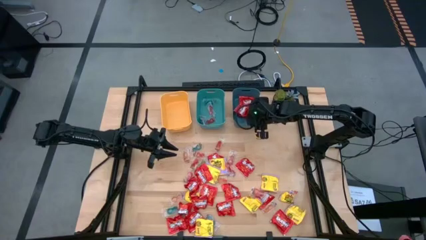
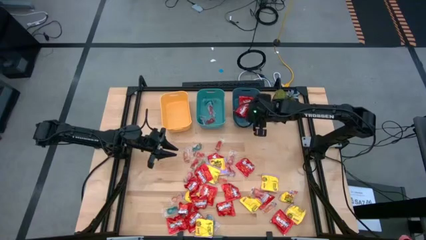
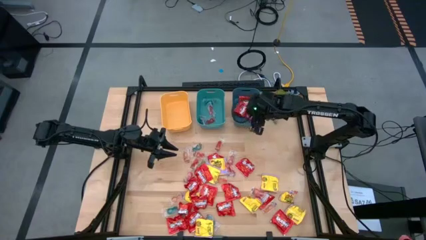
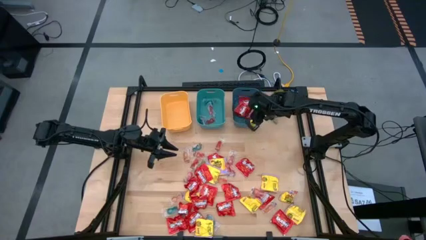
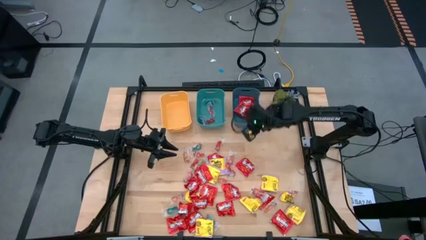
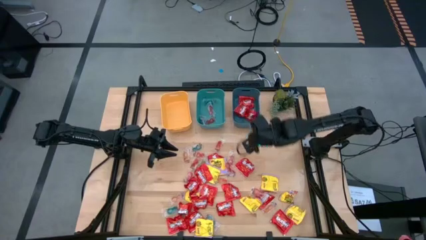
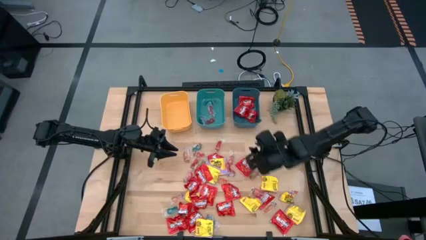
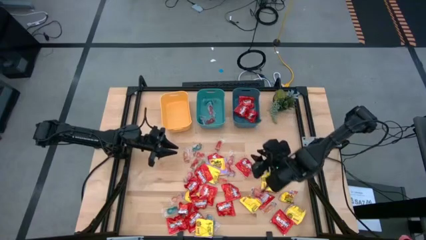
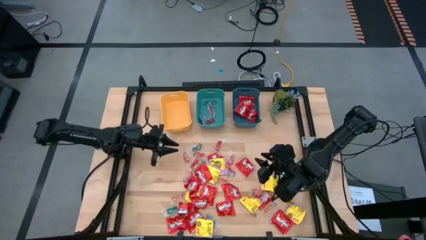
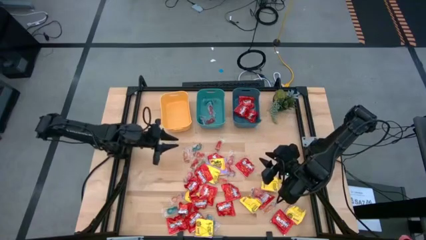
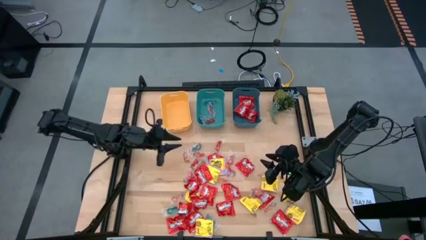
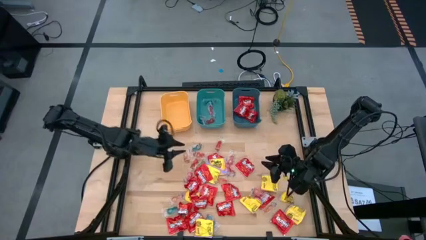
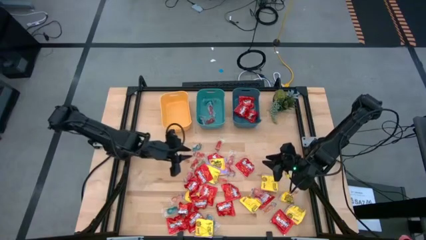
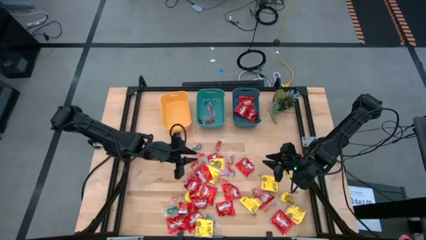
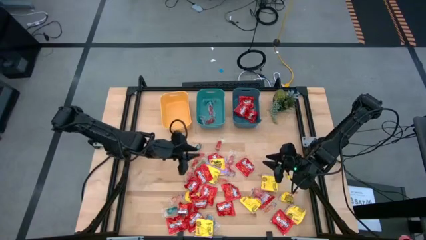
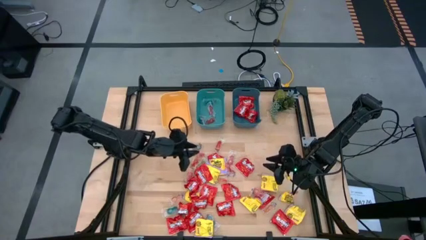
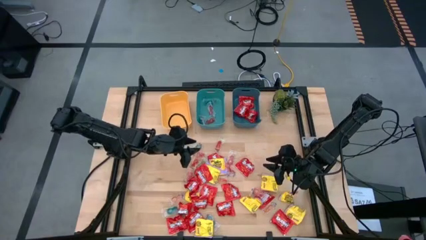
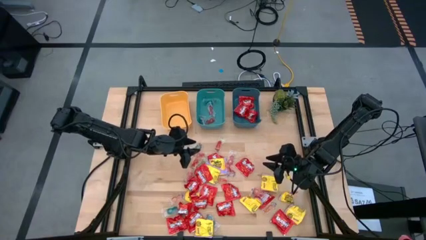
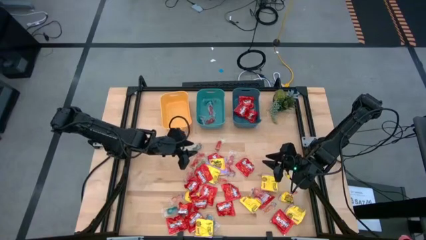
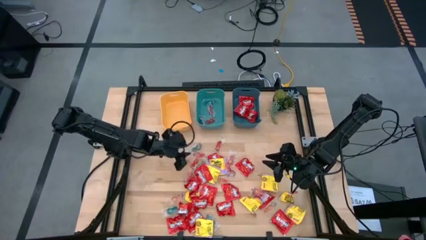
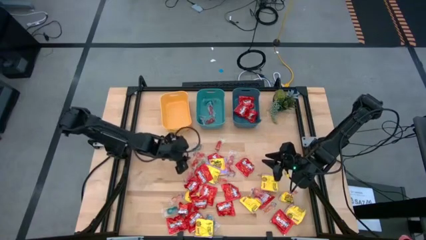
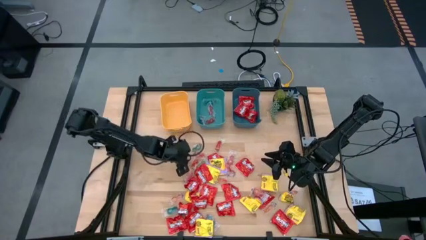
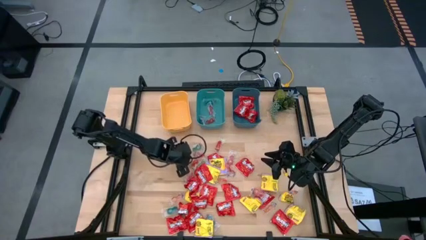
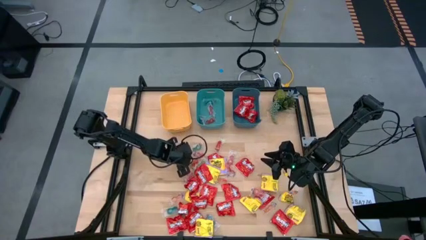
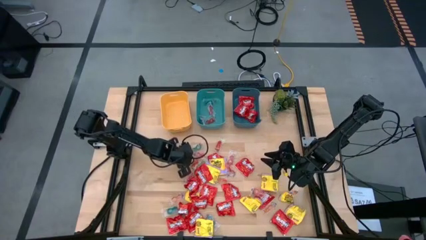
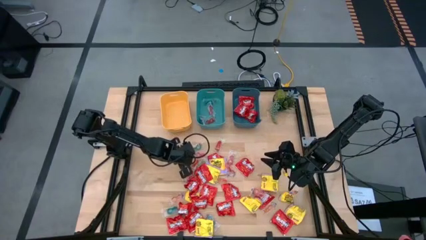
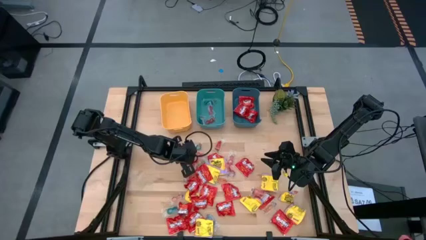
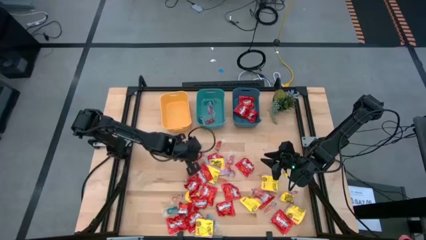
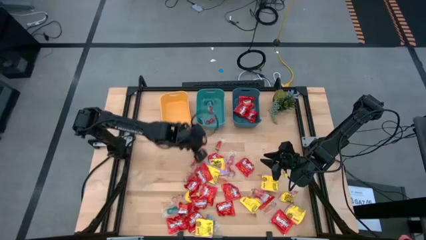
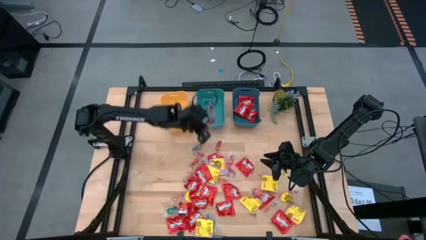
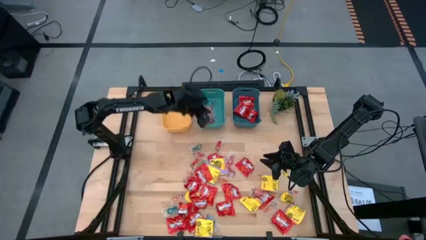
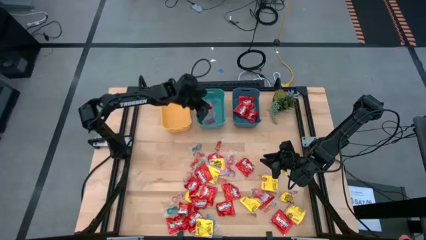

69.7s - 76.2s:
Task: Sort candy
Put the light orange gummy candy into the blue bin

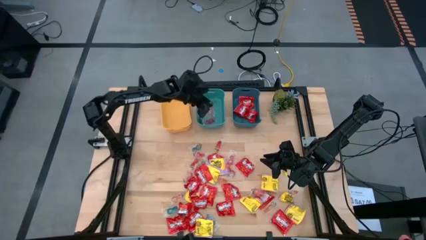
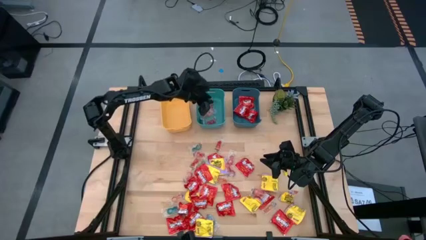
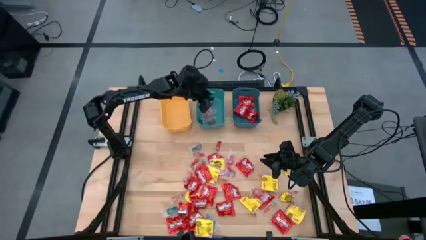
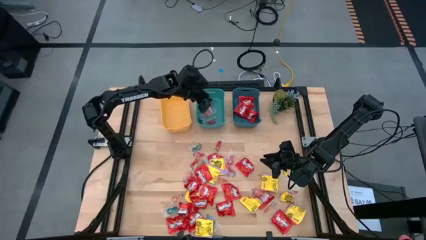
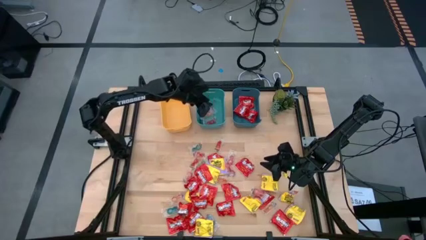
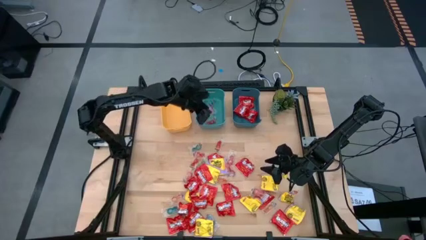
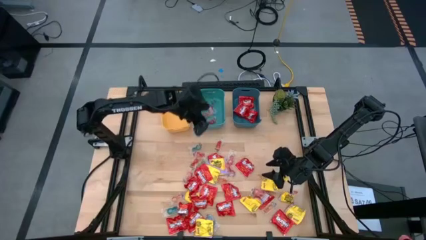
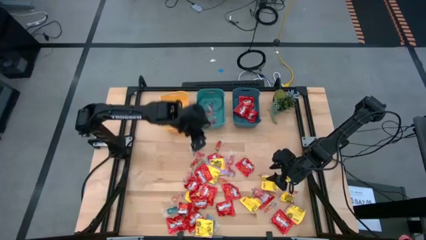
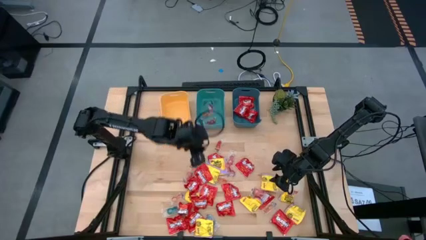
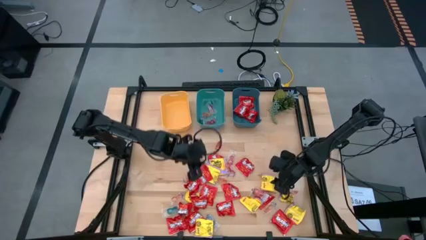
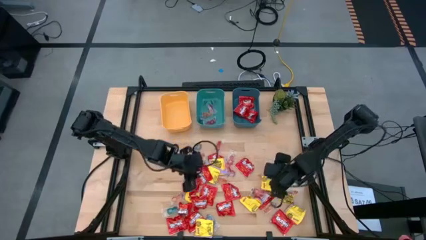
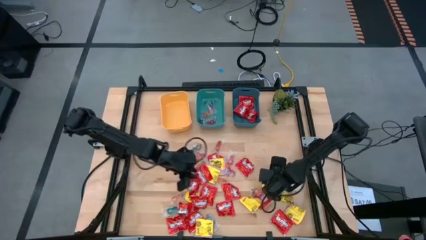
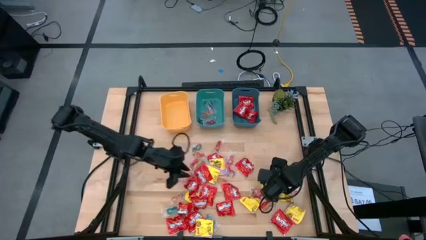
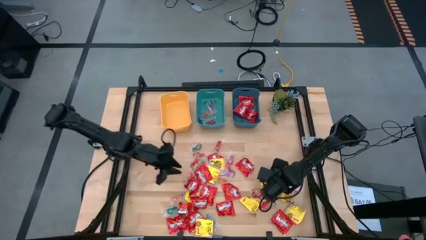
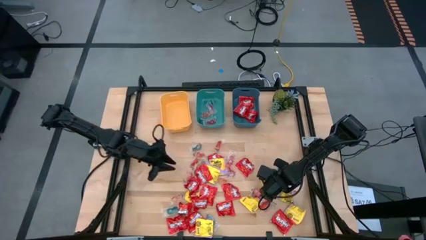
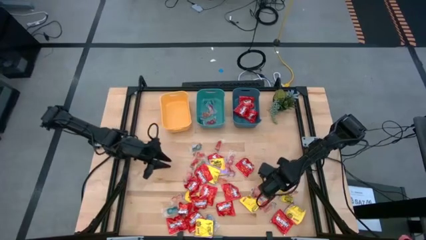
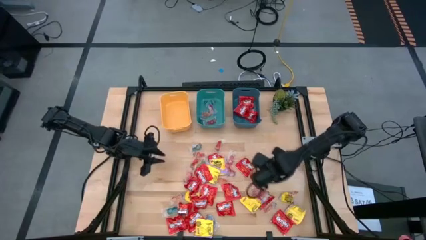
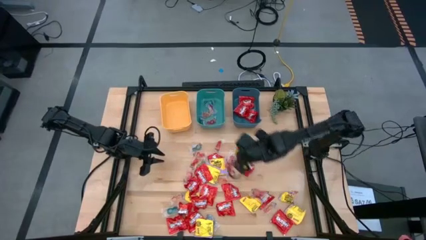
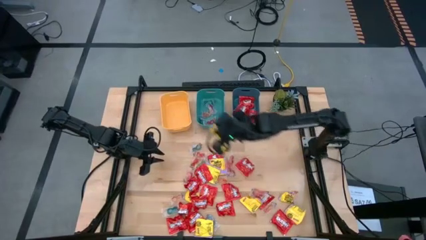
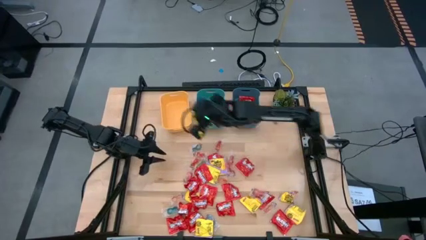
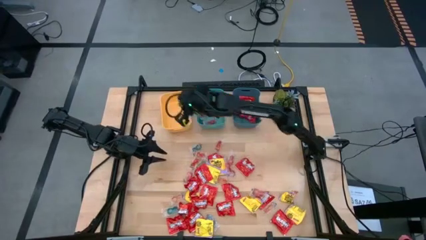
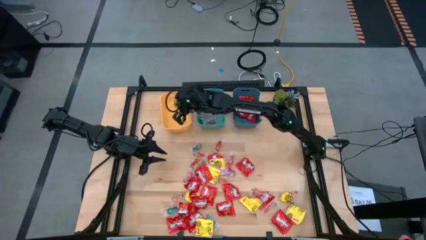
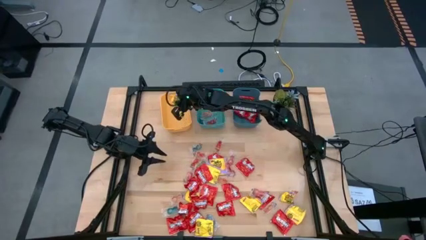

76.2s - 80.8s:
Put the yellow candy into the yellow bin

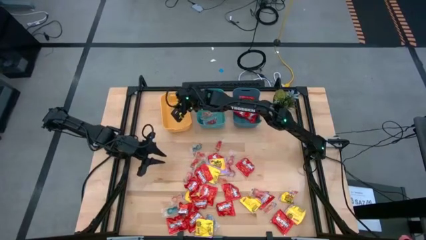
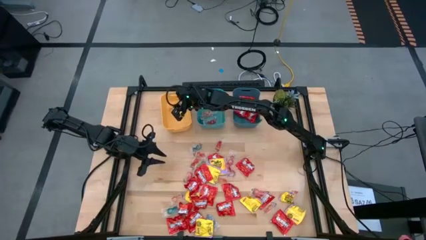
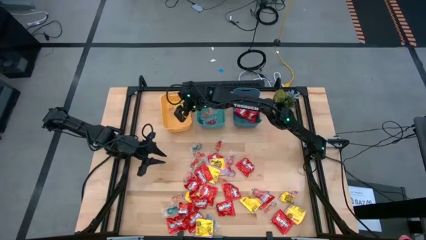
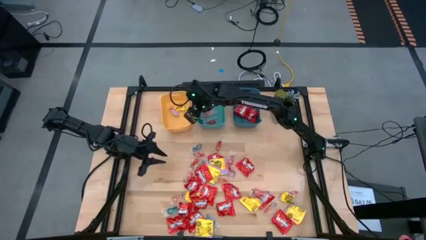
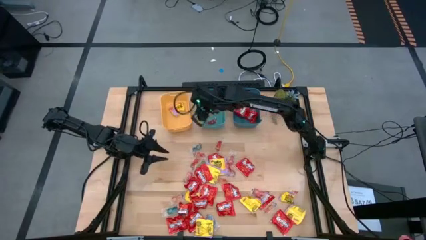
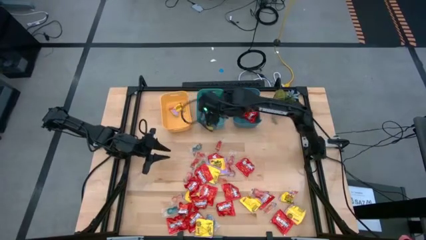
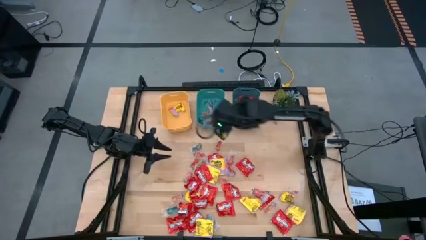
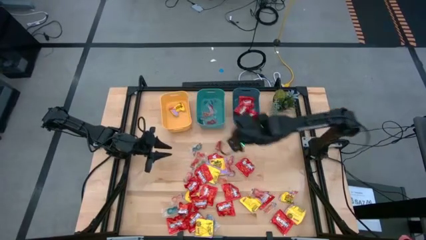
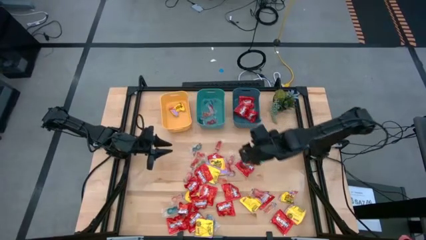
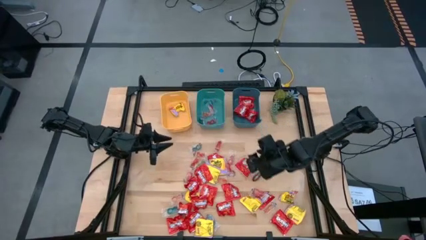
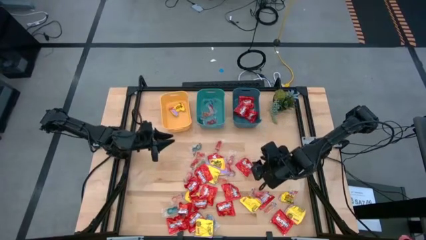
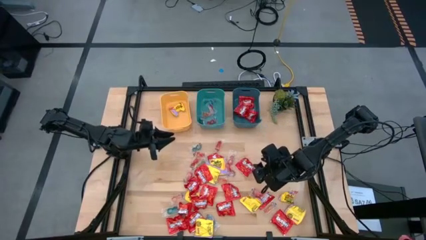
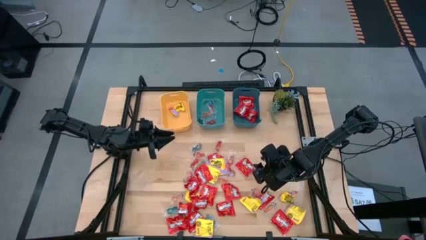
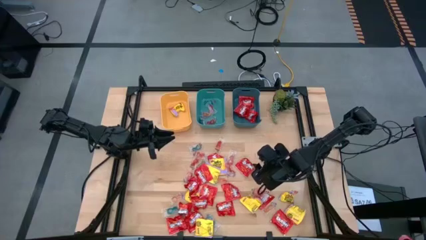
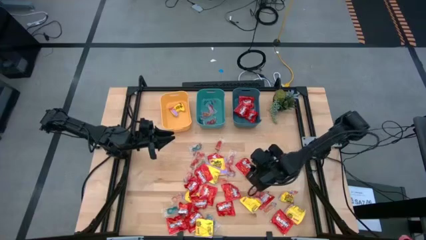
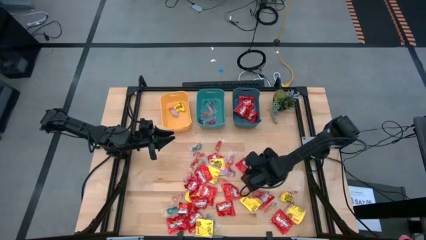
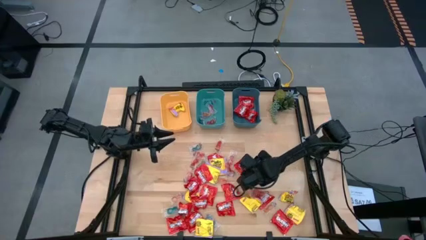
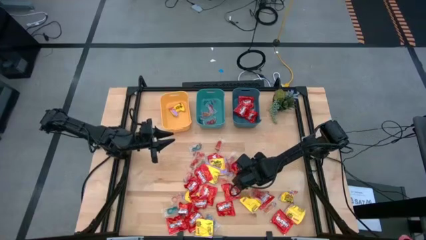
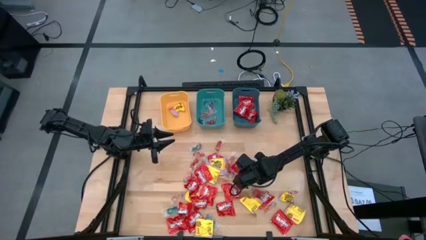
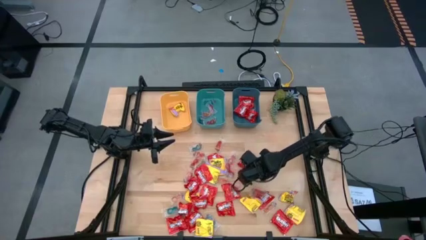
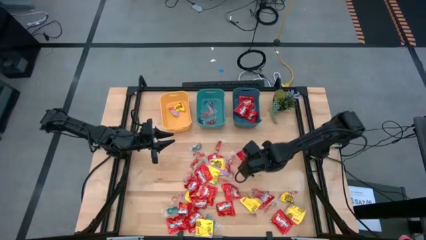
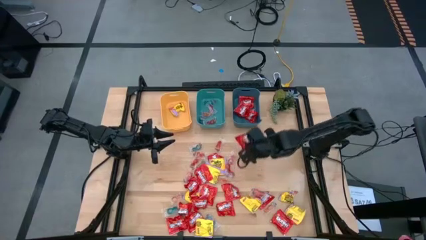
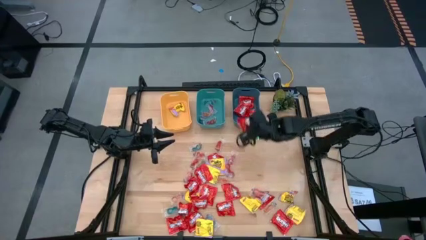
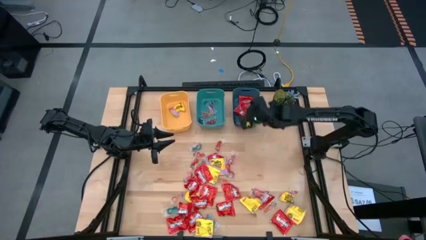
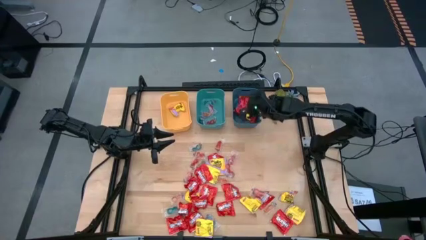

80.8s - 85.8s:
Put the red candy into the blue bin
